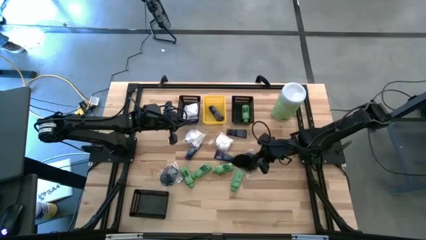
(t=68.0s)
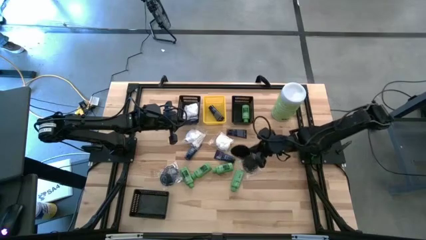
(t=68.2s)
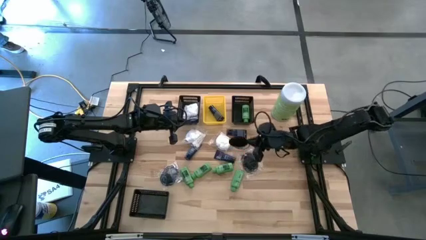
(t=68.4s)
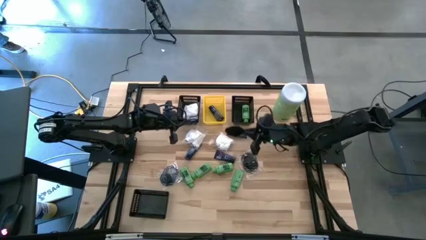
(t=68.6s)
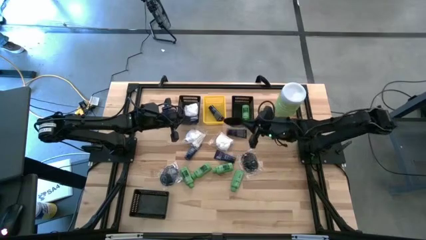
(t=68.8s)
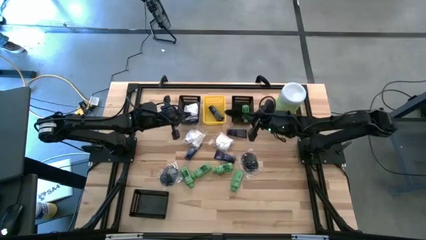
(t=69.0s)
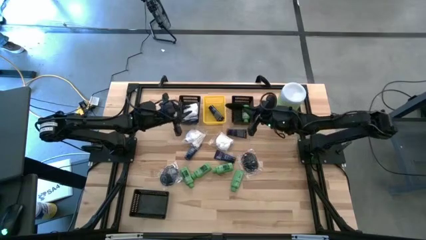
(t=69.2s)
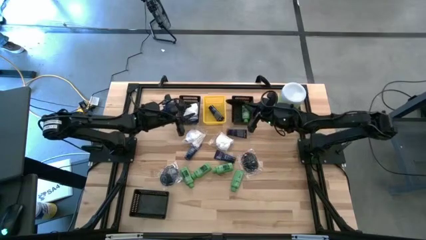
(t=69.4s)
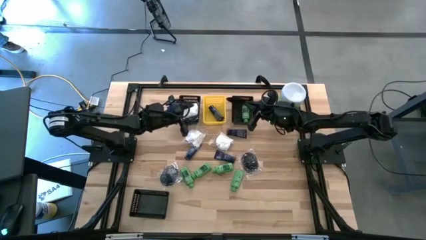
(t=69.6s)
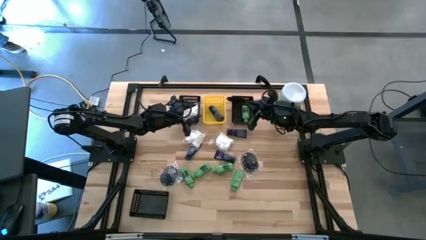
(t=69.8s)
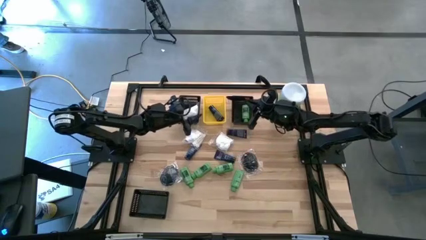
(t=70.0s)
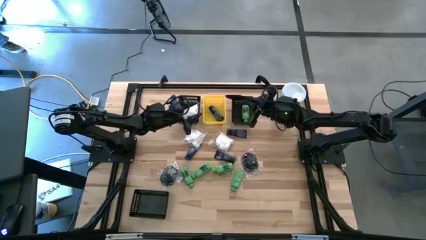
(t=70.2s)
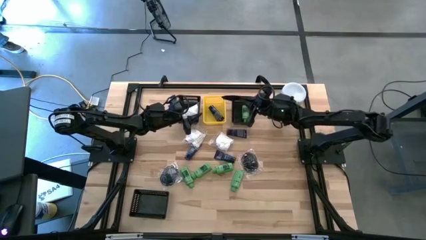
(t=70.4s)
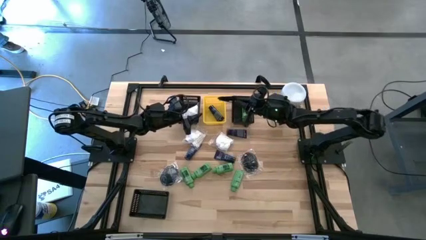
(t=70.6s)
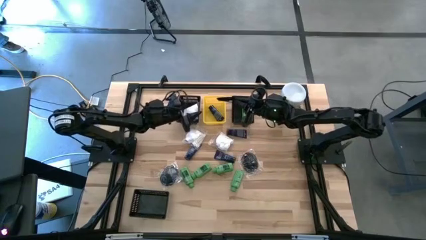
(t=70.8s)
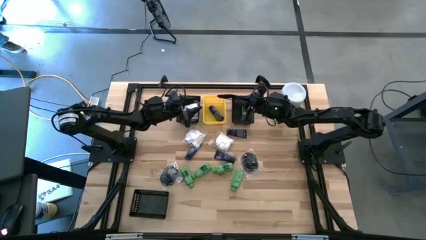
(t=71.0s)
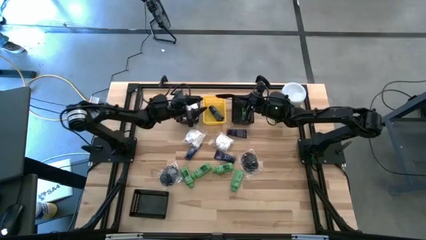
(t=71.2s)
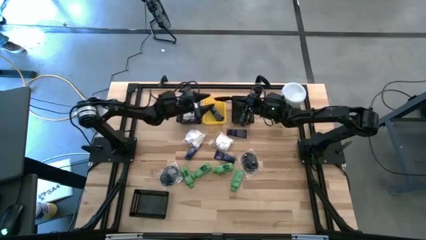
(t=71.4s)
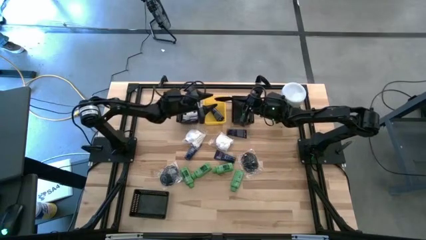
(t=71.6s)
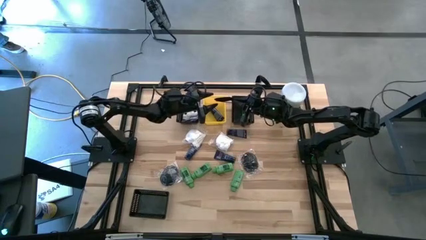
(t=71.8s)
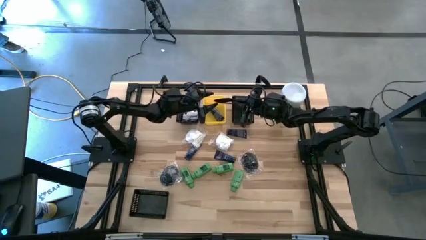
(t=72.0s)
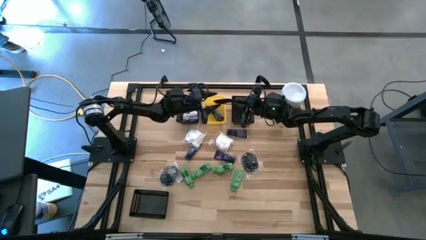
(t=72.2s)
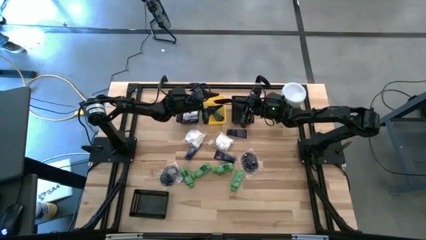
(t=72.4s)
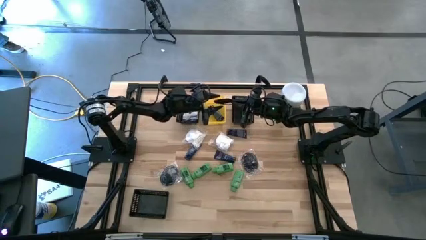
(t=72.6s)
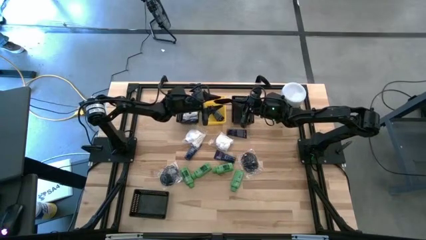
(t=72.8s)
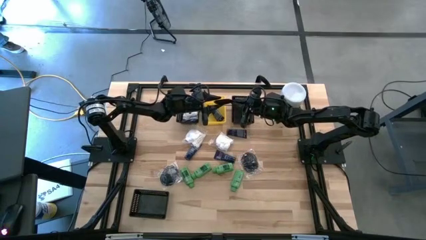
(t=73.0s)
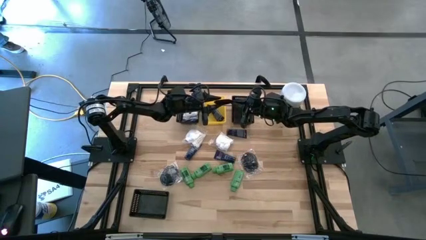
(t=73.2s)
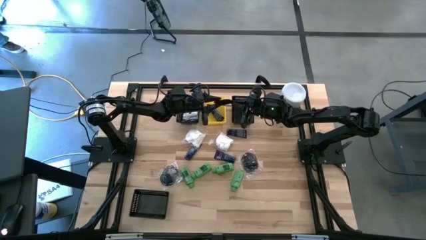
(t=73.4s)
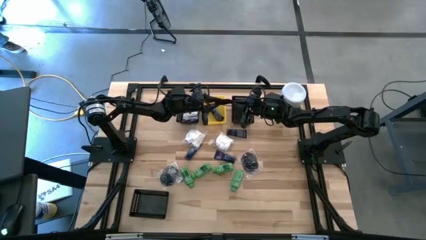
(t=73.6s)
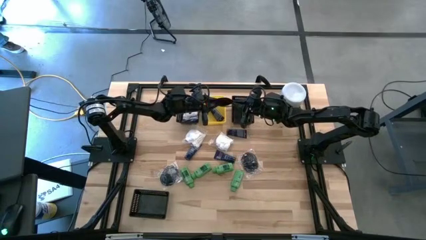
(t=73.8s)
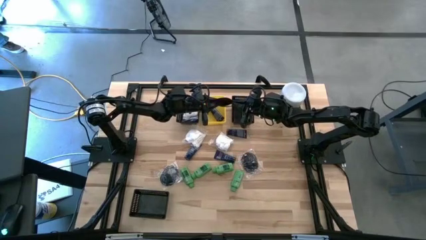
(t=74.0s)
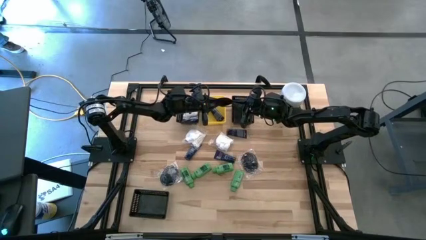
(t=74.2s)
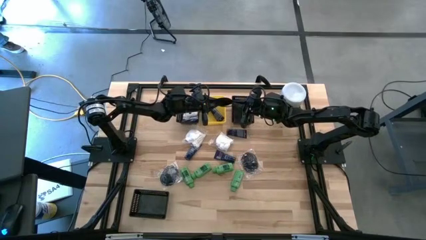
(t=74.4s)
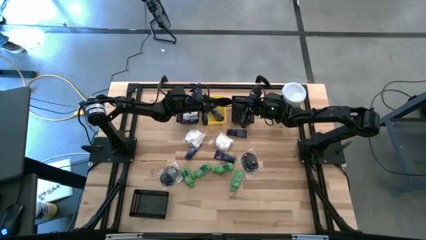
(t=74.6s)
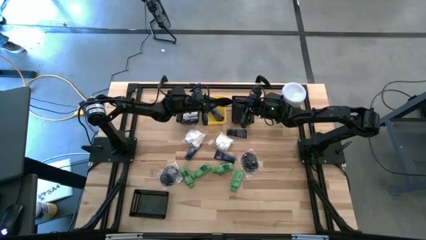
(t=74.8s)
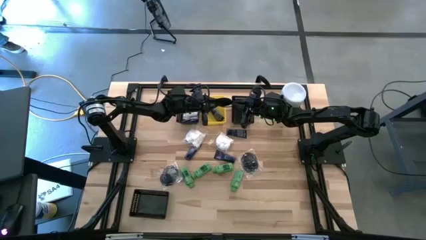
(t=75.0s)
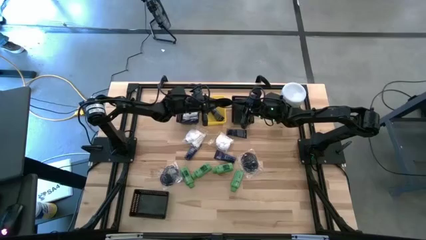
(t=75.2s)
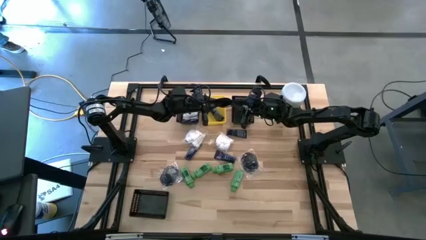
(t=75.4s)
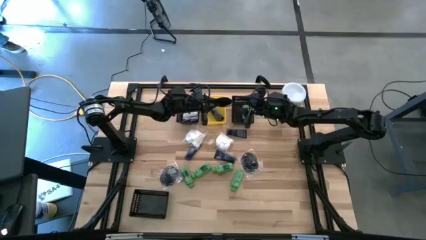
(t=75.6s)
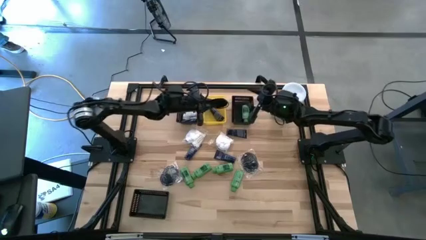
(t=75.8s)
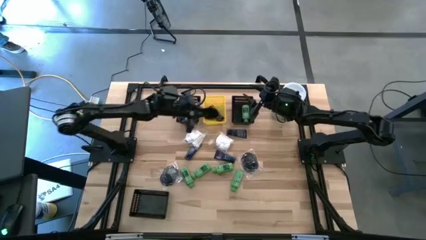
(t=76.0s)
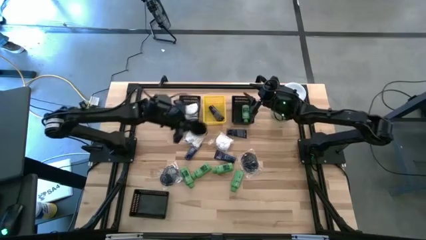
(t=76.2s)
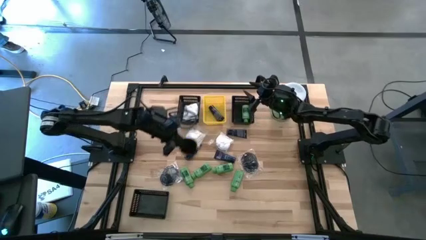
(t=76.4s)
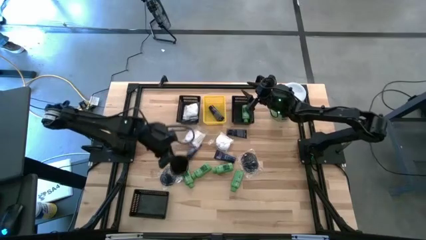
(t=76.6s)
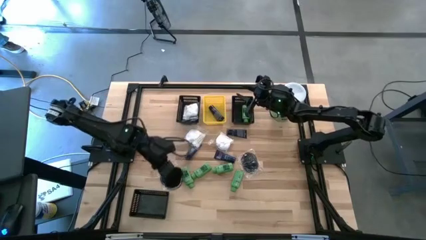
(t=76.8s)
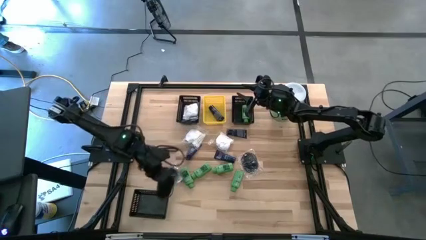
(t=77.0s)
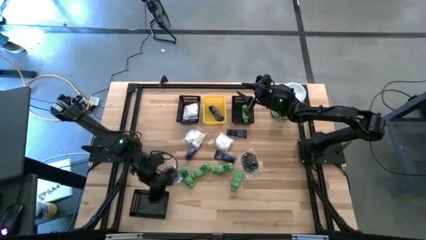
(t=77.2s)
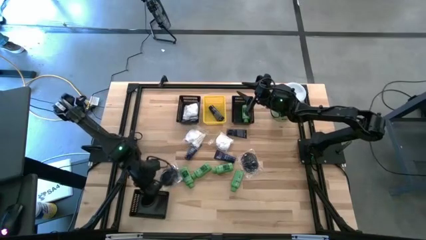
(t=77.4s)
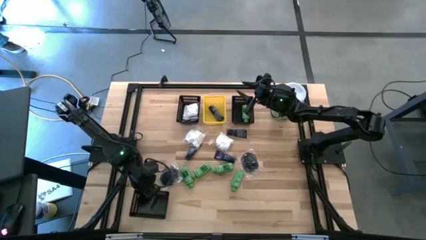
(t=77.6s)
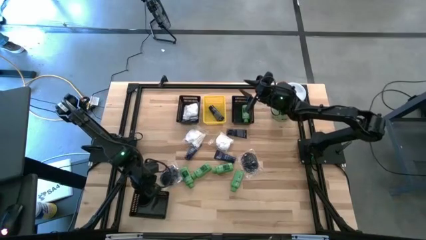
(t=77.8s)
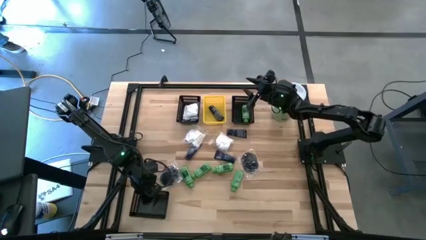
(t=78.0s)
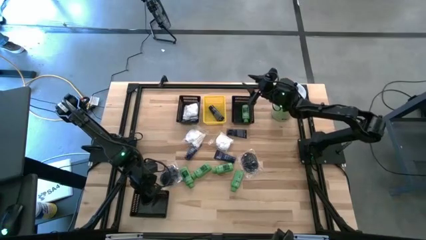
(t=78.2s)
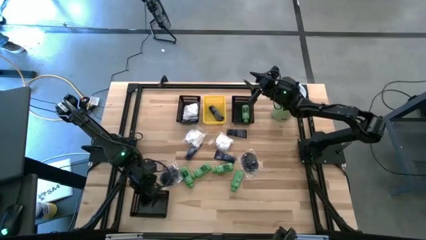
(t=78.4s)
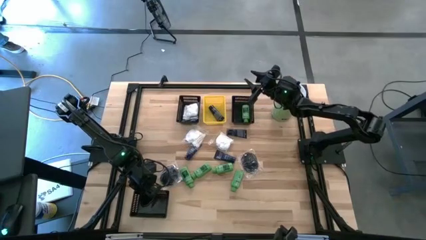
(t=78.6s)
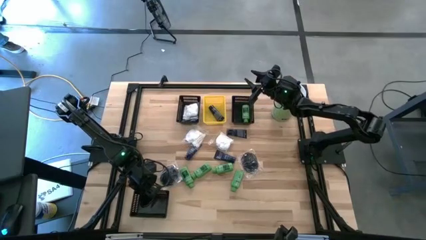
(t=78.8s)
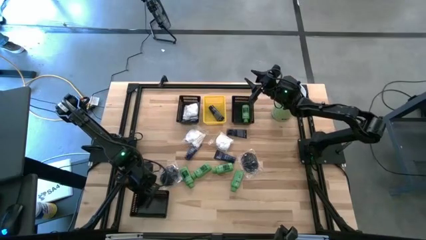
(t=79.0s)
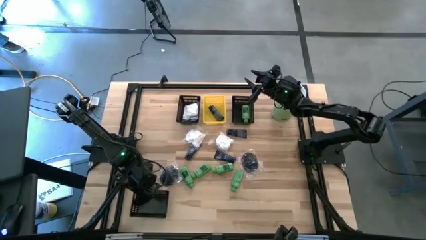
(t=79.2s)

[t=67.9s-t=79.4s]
Task: Pick & Place Travel size toiletries
Put the black hairbrush into the bottom black bin
